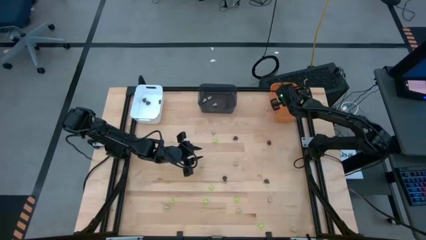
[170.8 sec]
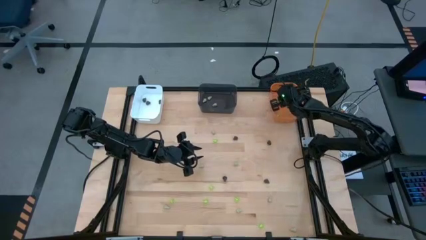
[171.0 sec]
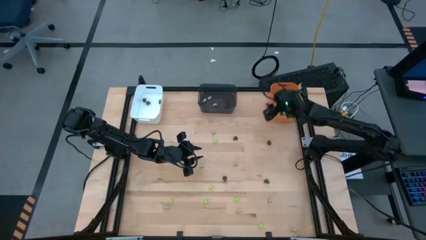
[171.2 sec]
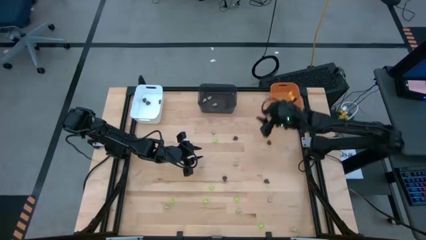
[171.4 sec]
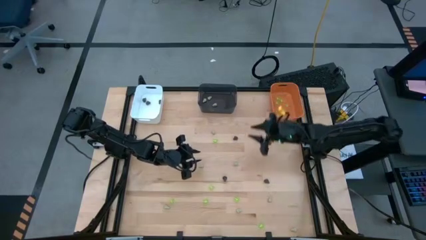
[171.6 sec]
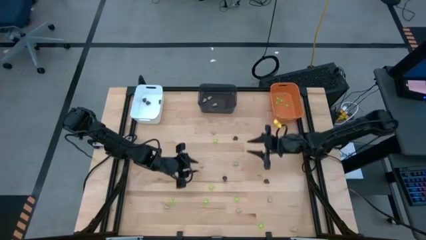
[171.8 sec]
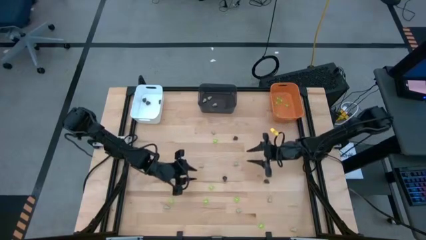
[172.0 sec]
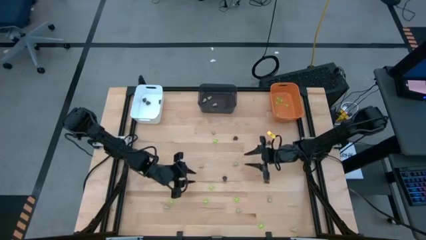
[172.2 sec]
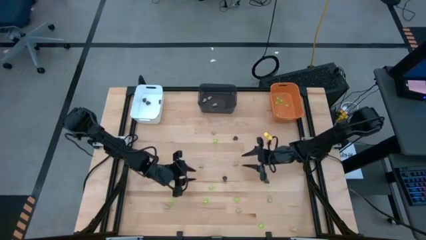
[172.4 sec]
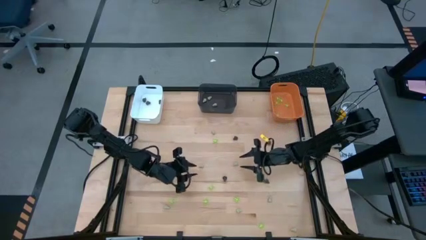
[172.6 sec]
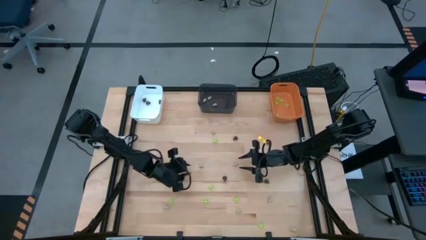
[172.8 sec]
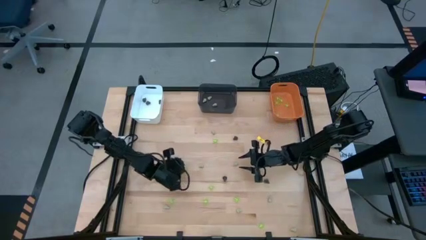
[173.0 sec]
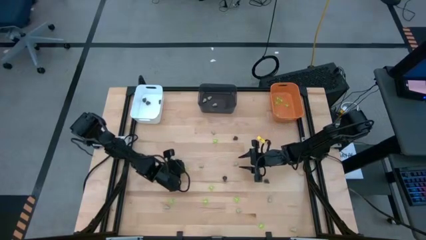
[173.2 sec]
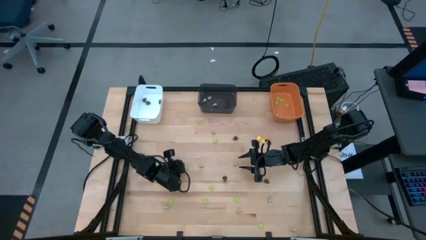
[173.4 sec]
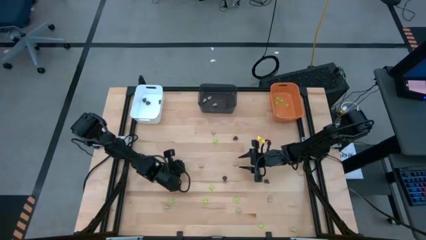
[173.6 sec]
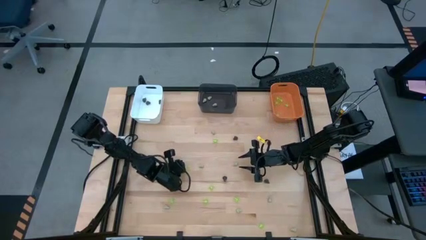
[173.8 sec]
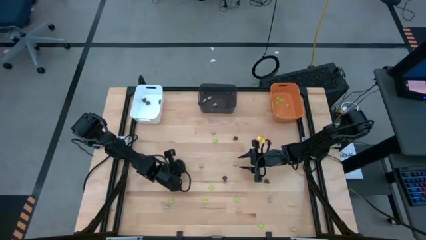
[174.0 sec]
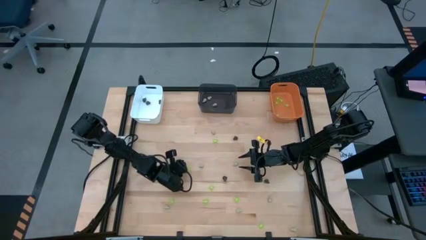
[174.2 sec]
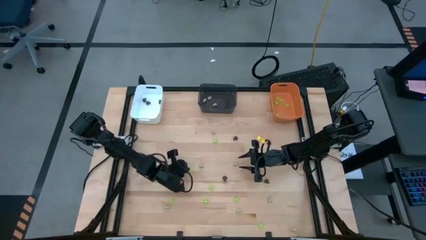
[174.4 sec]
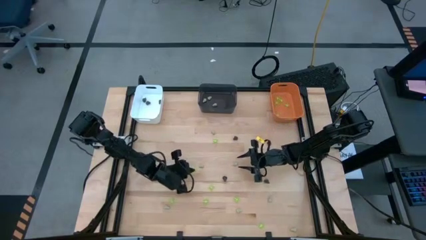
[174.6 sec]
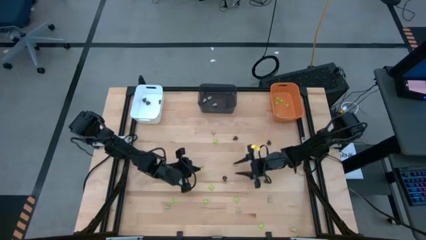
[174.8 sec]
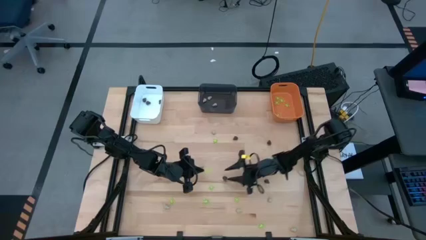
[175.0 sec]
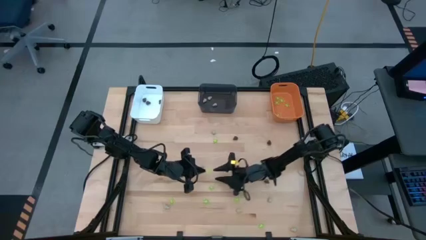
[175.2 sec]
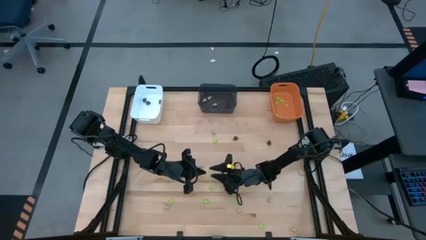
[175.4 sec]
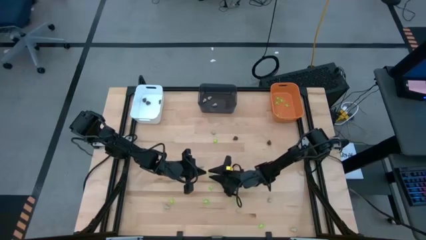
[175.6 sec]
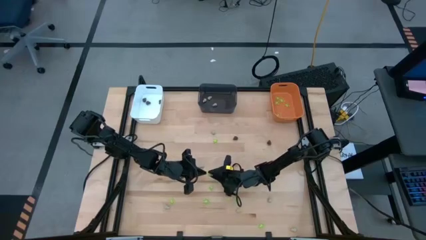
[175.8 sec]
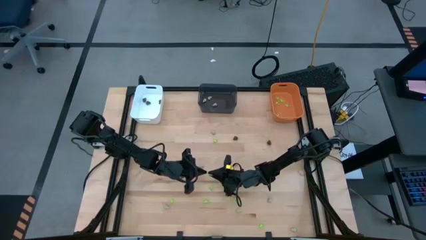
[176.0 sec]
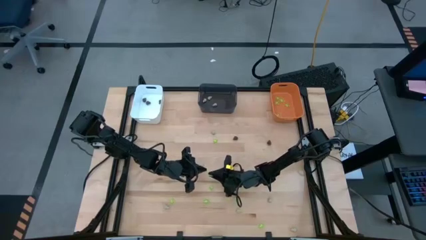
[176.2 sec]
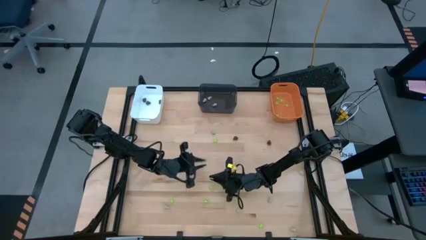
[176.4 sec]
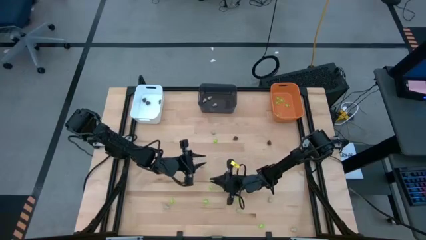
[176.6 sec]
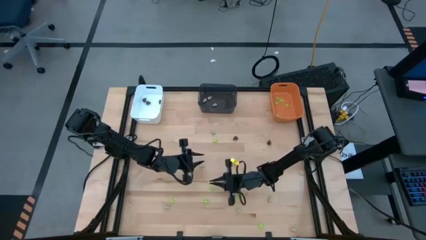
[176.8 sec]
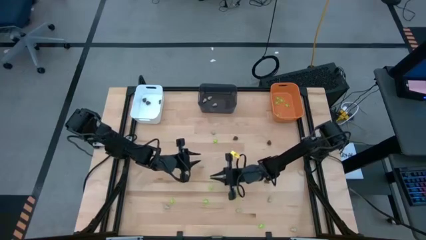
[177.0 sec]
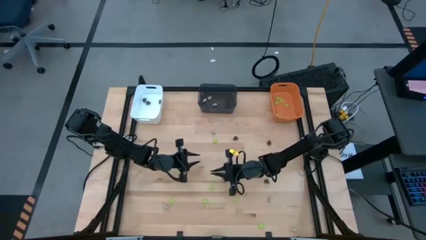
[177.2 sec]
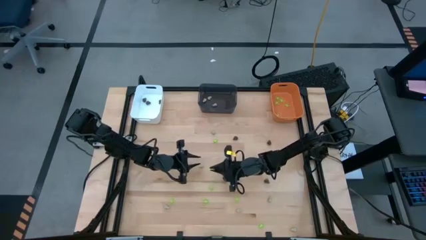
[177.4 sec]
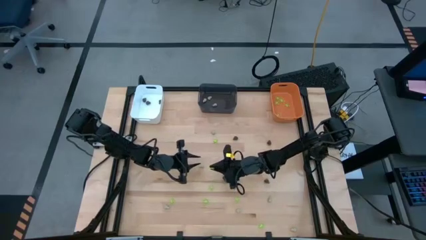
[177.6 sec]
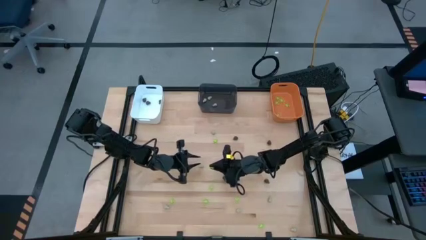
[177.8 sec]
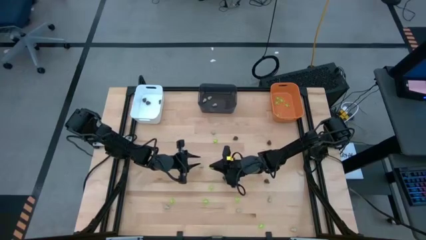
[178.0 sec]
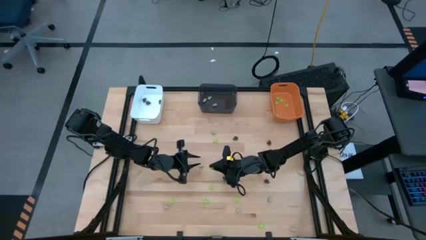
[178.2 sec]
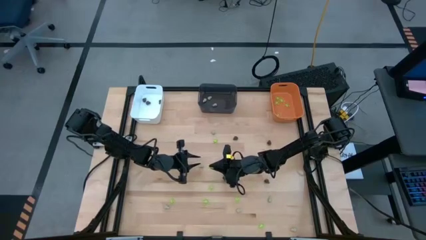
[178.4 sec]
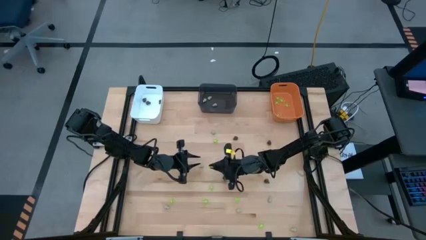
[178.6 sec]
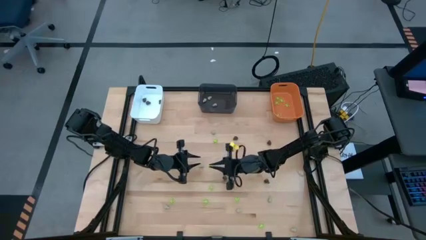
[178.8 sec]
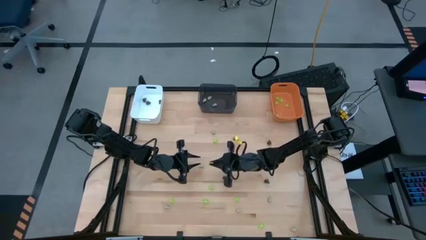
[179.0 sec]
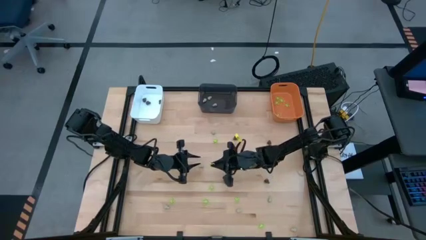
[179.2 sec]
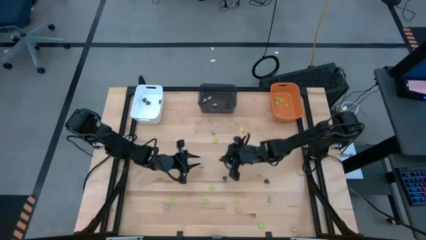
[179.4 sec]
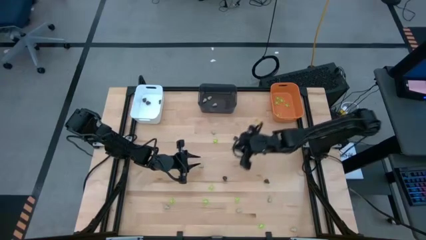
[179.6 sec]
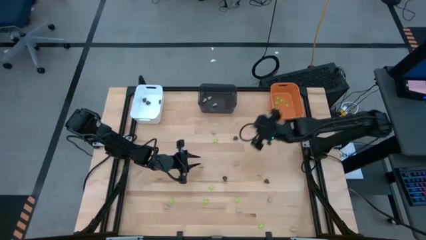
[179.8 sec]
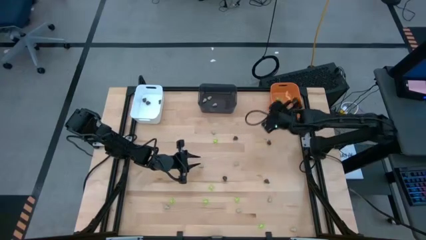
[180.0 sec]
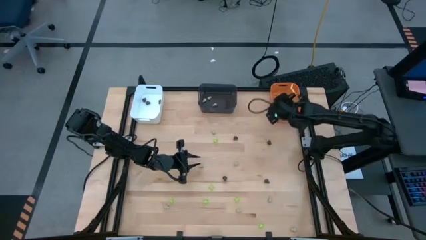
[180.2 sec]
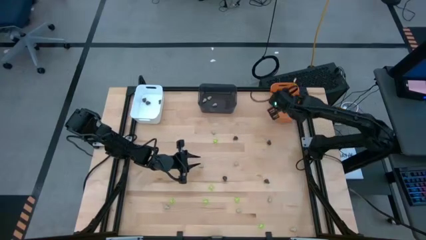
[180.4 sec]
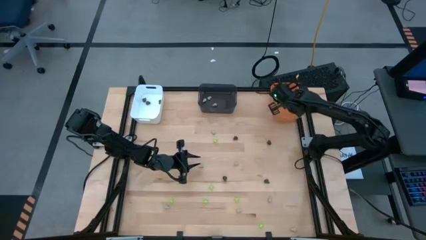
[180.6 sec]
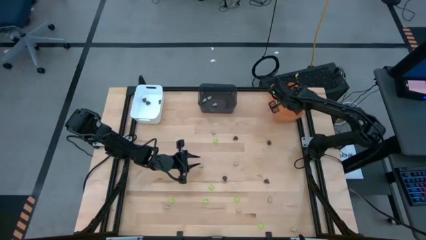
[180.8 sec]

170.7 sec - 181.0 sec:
Task: Sort Halloween decoration
Put the green toy spider into the orange bin

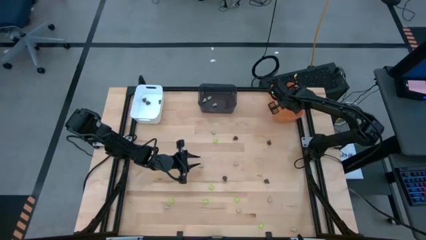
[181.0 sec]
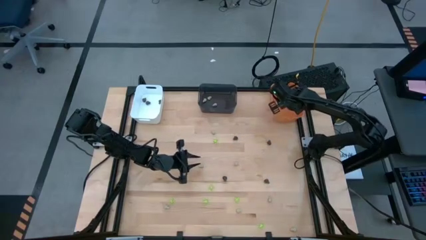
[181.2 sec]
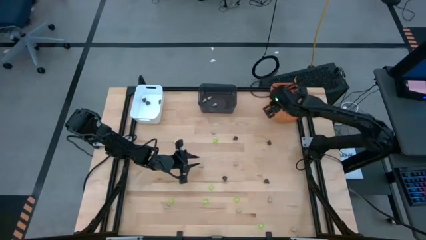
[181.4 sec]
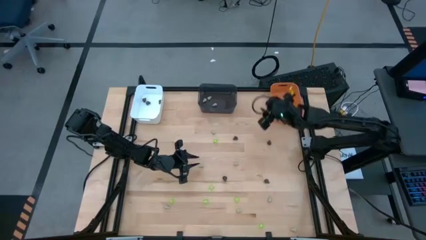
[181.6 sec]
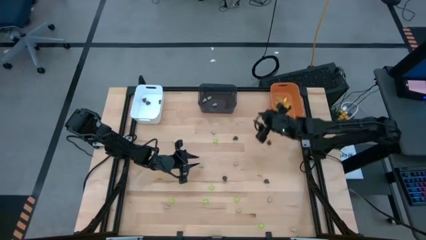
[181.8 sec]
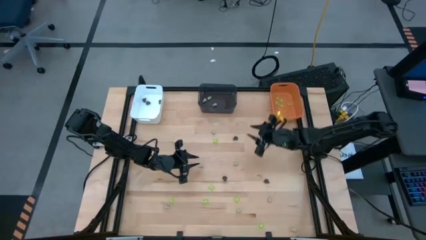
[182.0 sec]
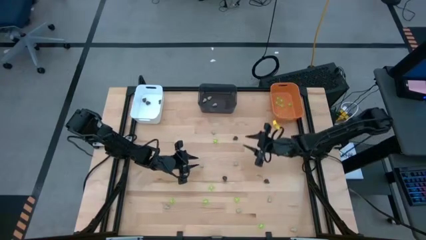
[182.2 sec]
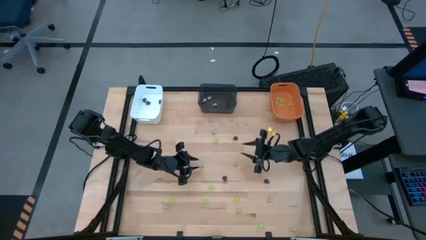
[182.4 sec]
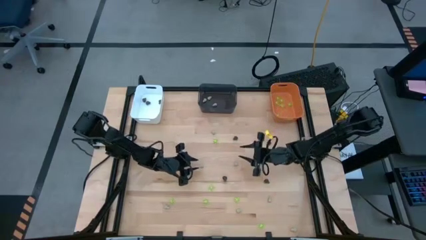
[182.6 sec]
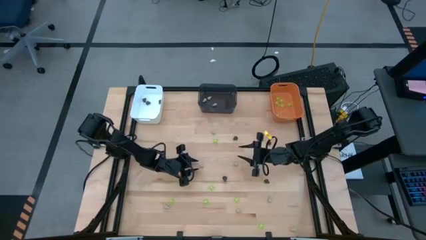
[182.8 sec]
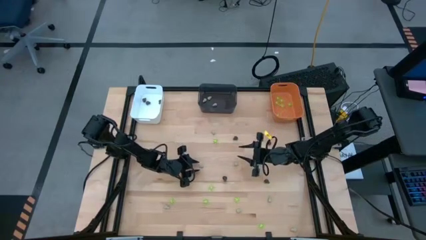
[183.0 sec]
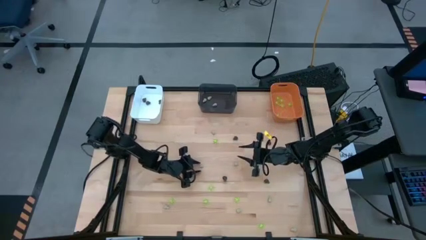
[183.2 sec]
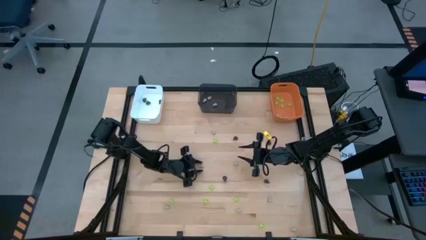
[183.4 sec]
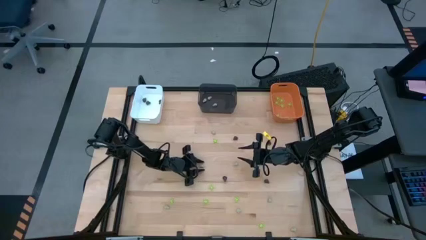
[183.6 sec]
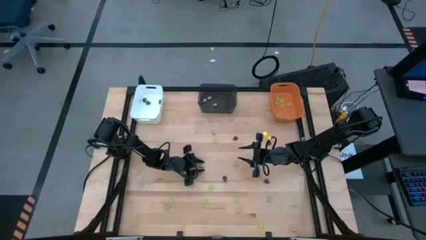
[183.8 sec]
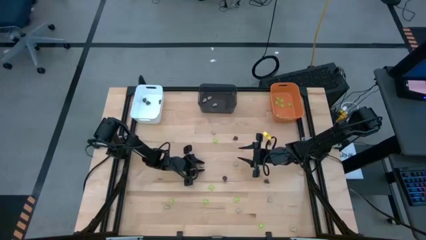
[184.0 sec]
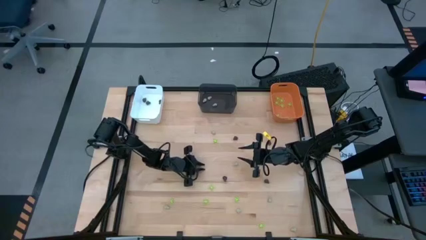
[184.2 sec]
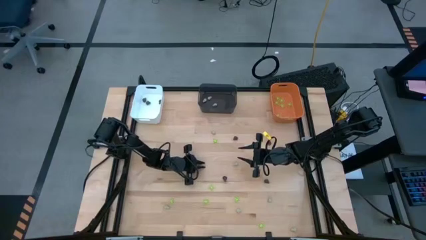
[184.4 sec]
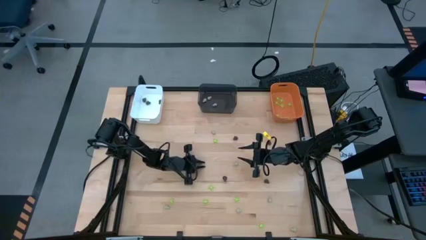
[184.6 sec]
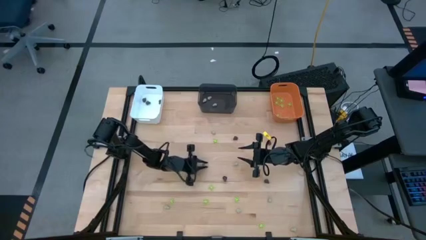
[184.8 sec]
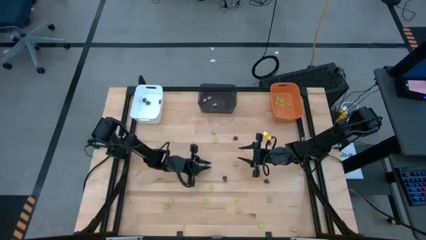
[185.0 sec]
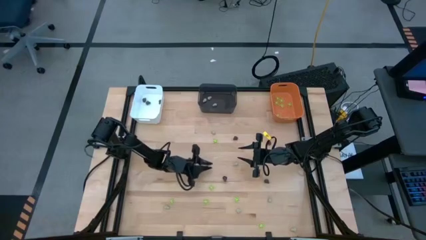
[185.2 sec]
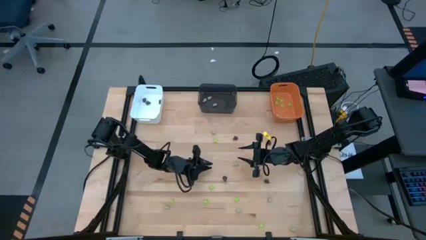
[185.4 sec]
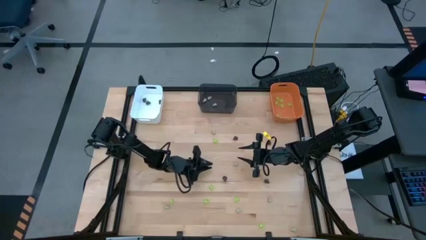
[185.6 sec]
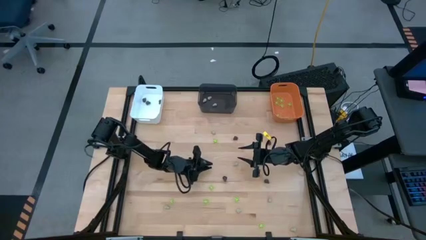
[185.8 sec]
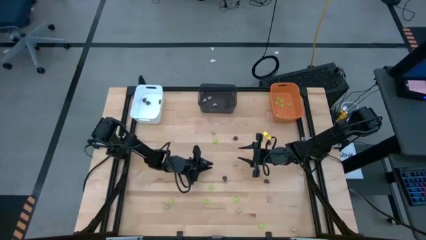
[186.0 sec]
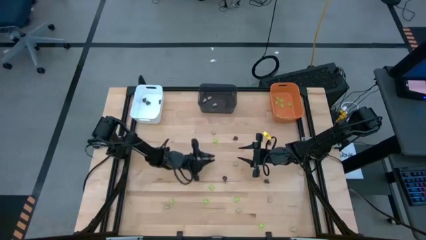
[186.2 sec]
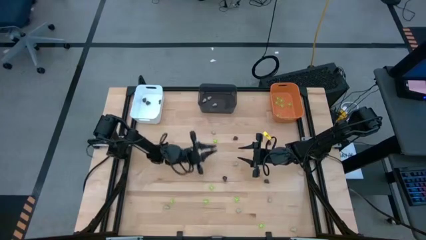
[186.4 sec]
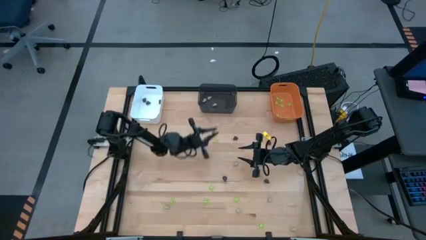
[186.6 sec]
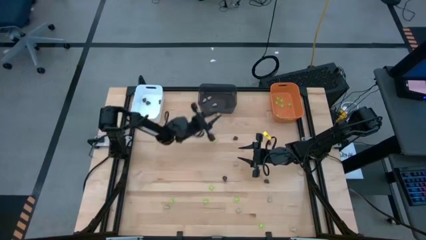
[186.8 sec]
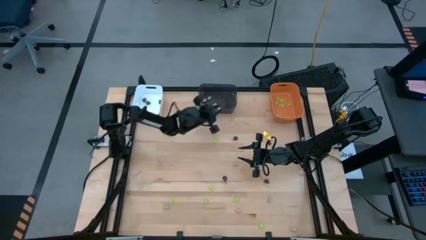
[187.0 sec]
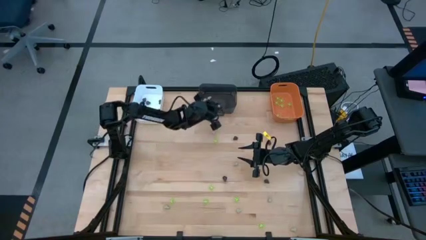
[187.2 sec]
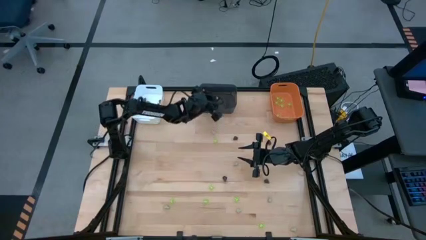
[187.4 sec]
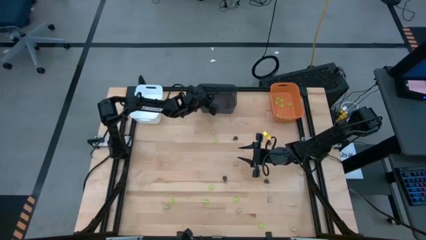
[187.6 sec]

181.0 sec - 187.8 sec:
Put the white toy skull into the black bin
